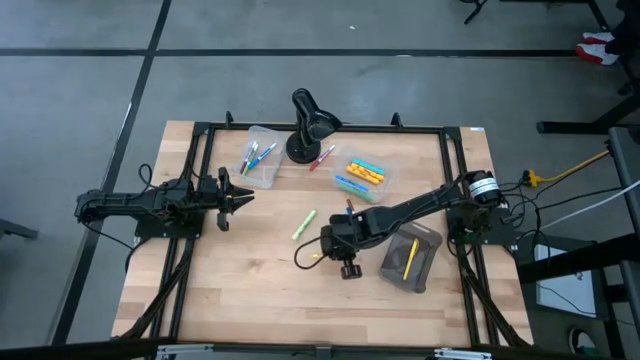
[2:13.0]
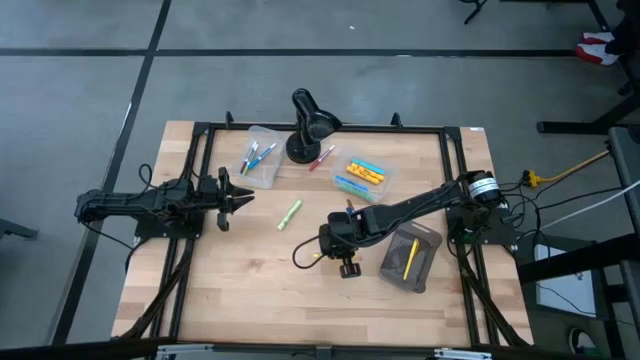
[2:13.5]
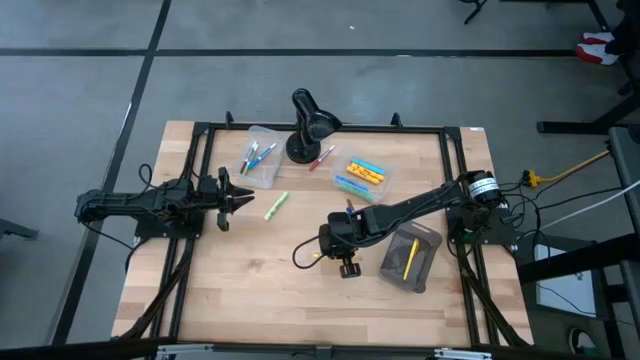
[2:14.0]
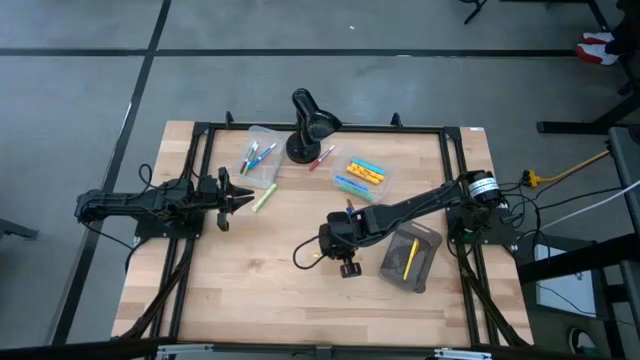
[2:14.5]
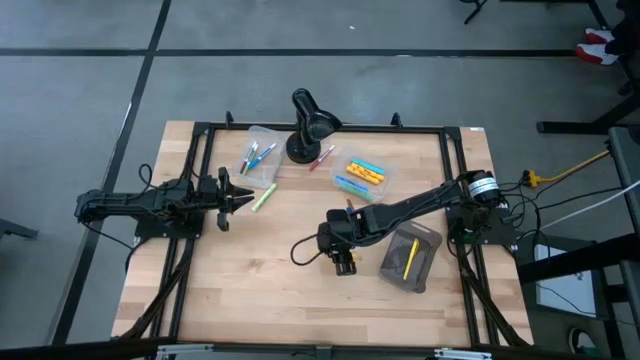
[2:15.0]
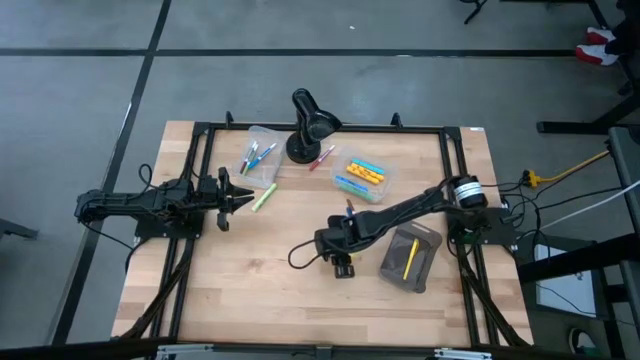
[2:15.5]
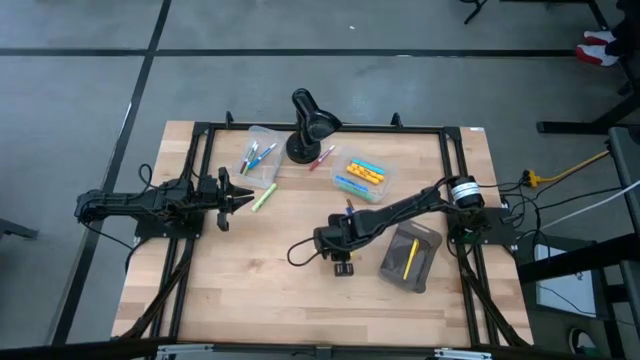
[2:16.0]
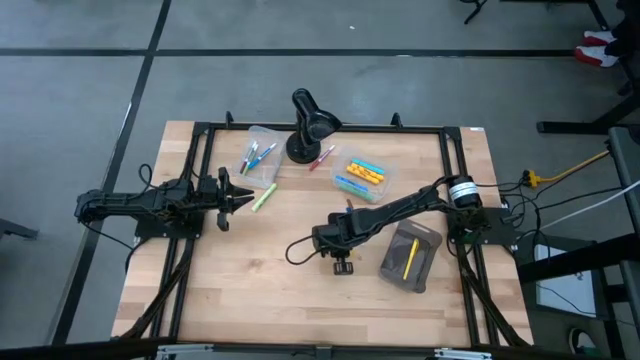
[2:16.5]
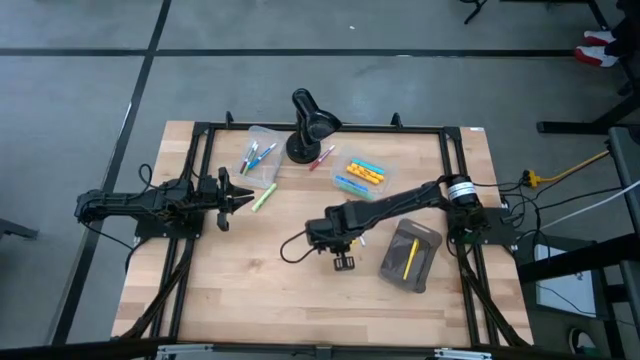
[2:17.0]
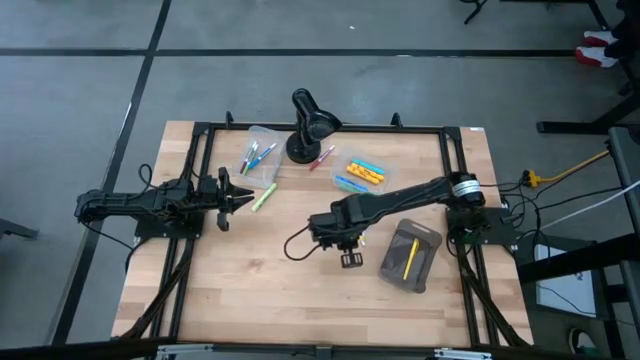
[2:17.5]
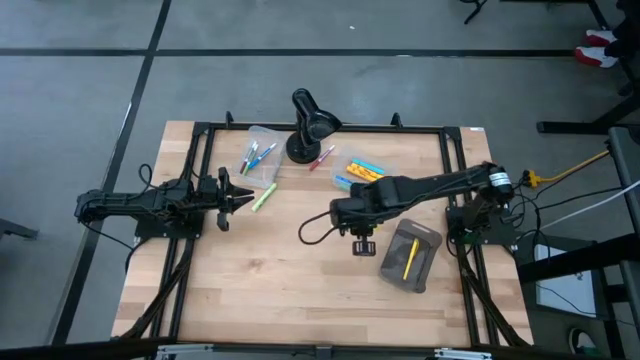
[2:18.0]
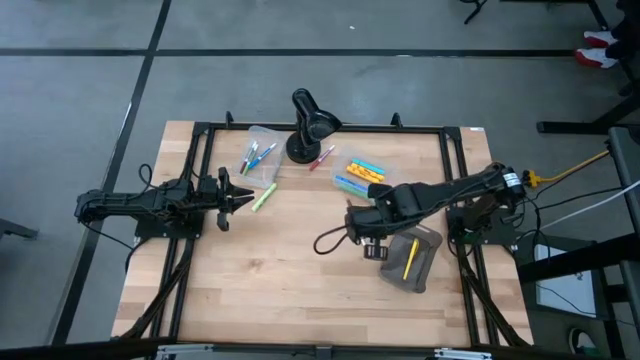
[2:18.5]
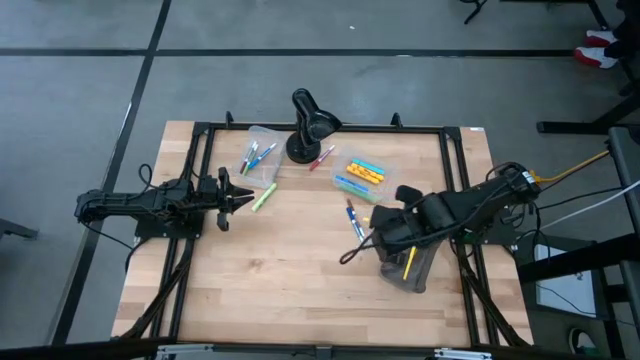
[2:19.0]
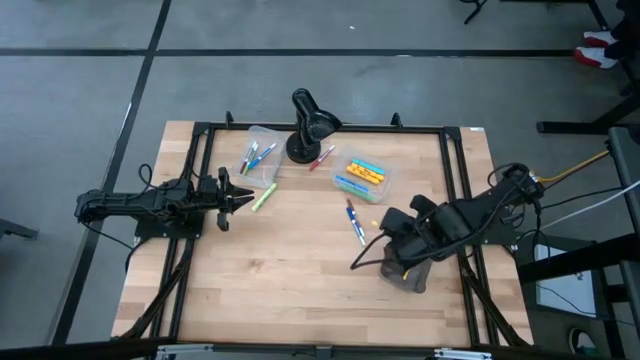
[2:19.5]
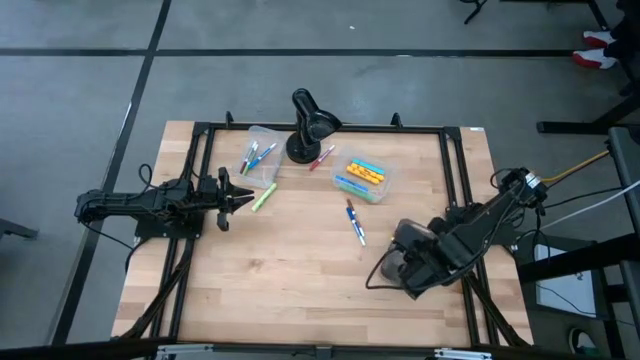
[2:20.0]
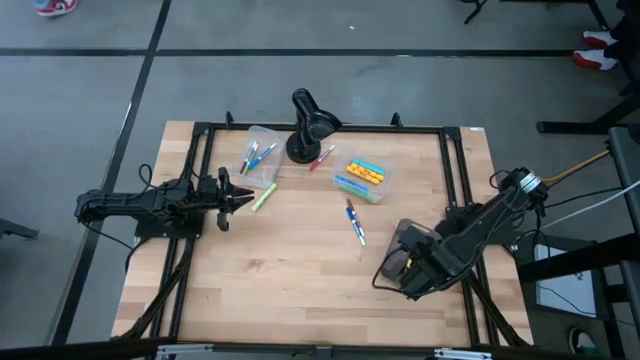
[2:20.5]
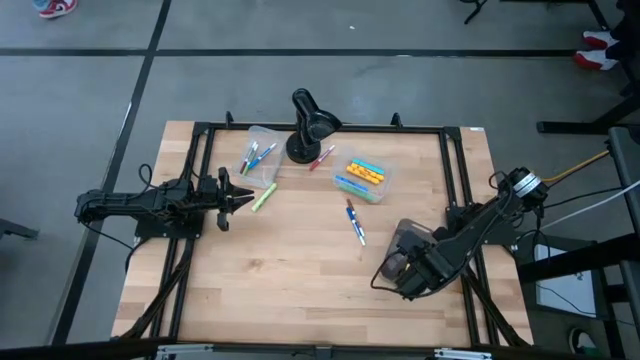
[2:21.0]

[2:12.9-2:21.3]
Task: Pick & Place Markers
Put the yellow pen into the black bin

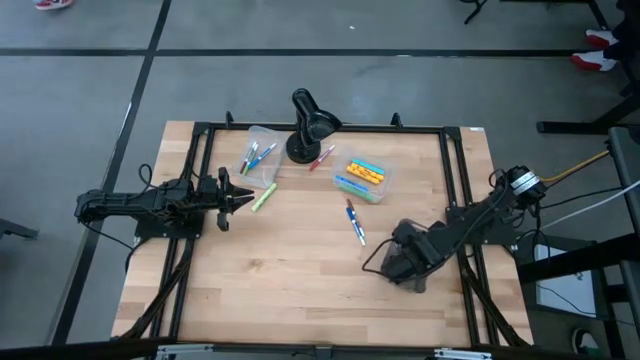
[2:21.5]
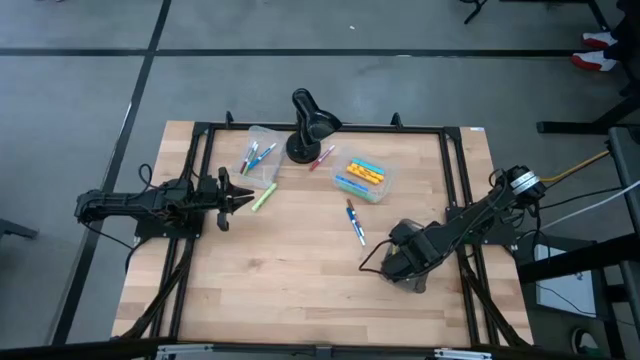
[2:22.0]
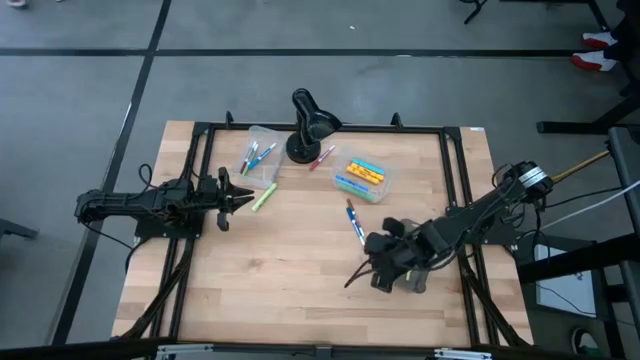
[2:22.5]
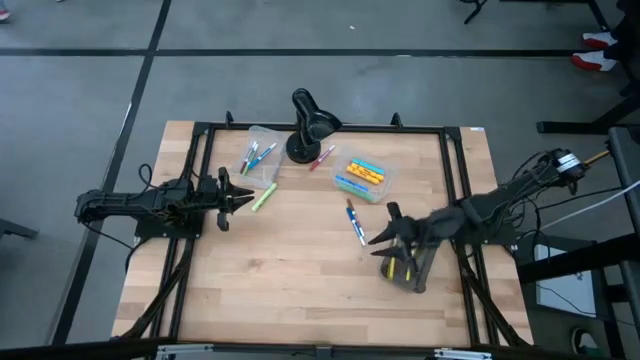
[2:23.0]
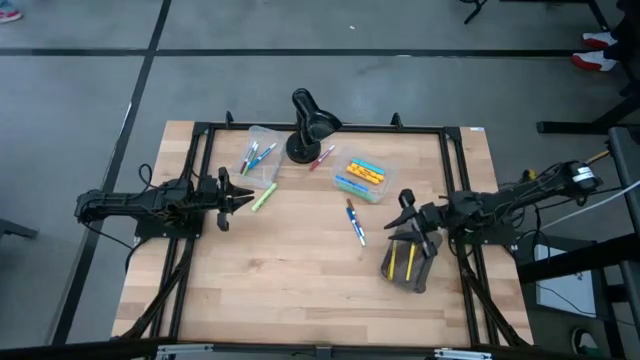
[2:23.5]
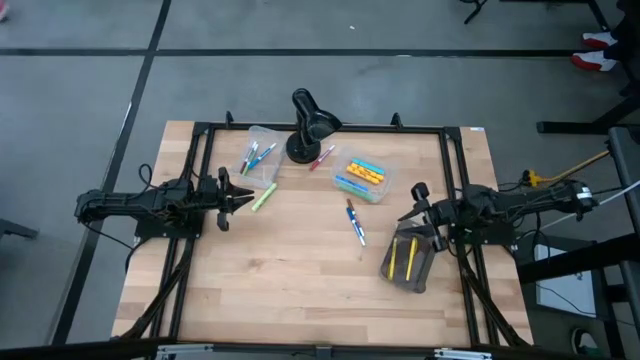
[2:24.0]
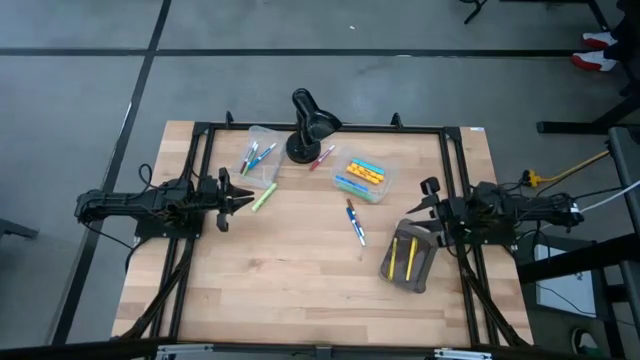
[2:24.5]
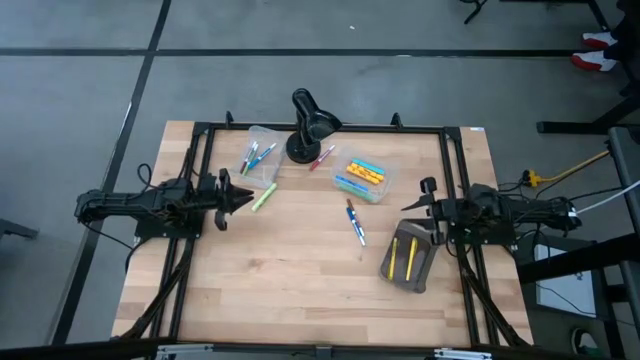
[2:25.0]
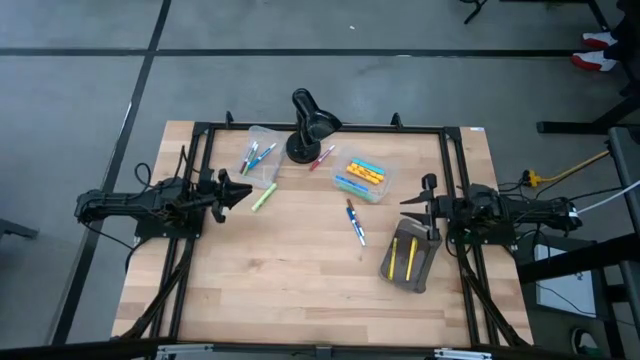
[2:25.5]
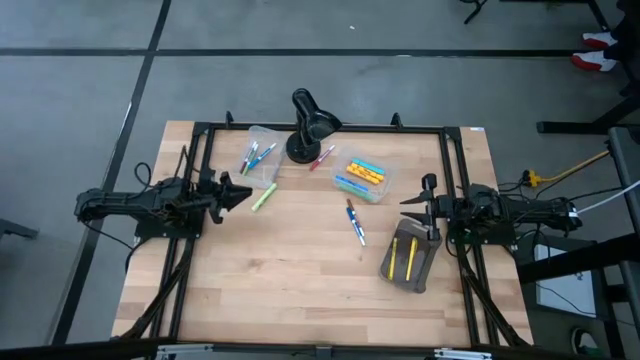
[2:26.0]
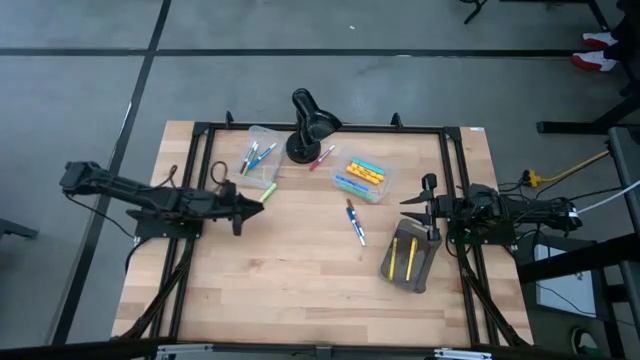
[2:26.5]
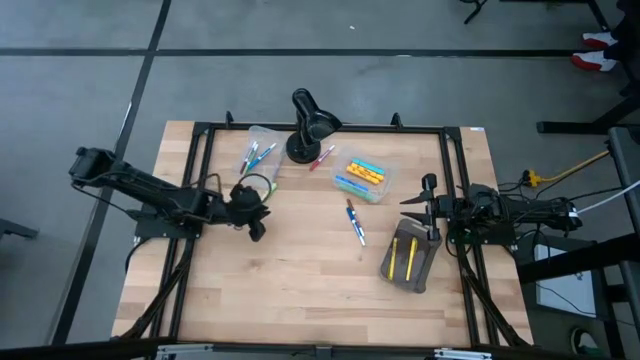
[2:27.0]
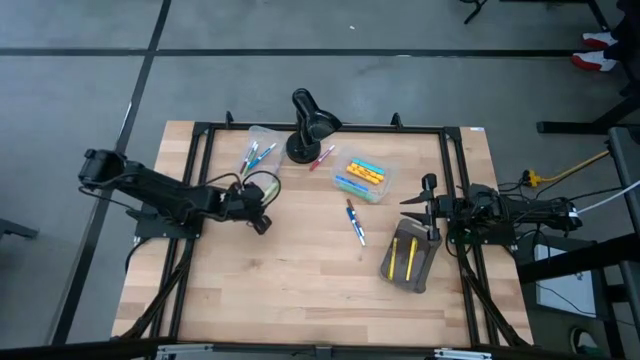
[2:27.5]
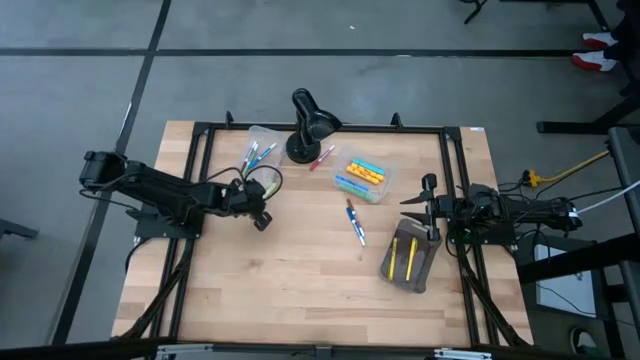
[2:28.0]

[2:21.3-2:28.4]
Put the light green highlighter pen into the right transparent bin

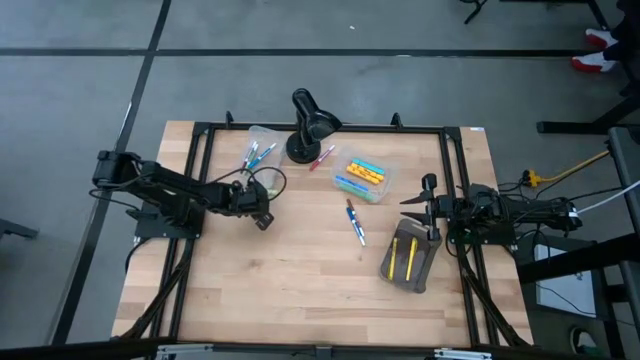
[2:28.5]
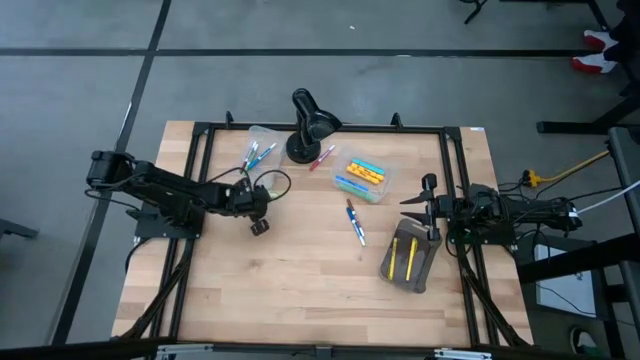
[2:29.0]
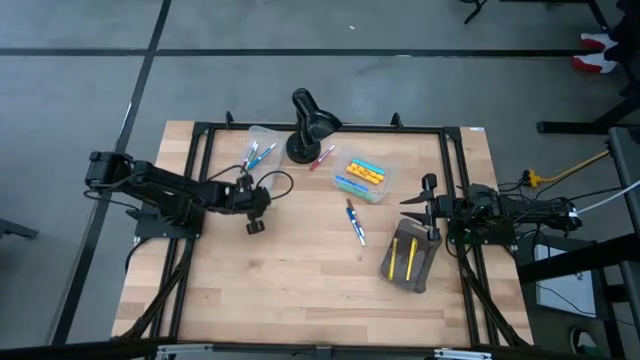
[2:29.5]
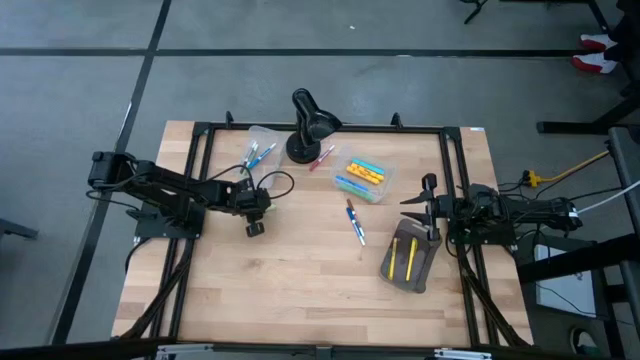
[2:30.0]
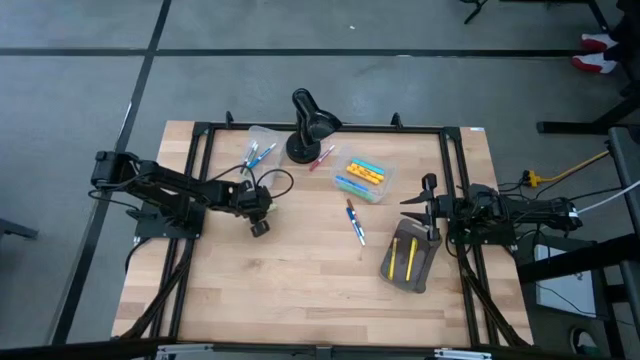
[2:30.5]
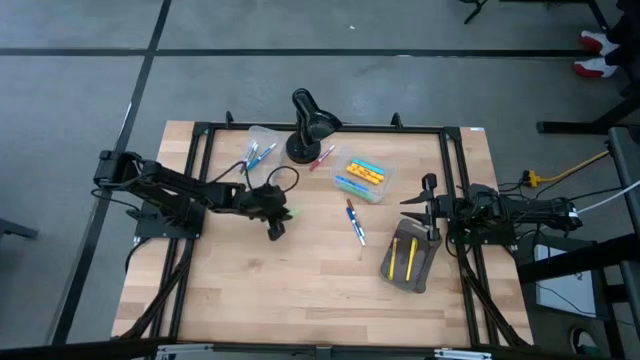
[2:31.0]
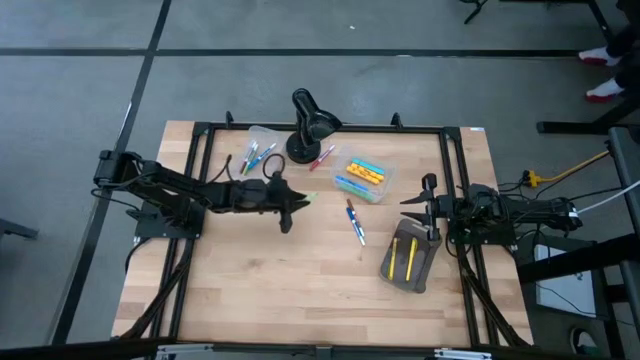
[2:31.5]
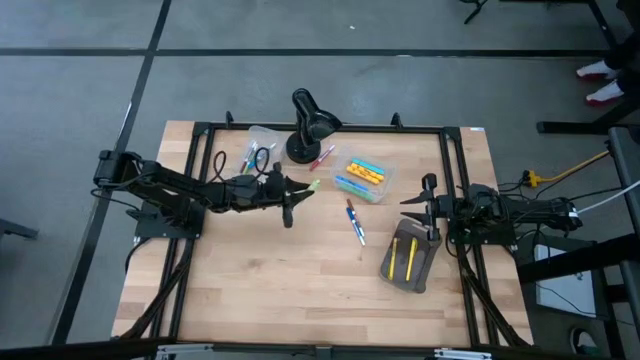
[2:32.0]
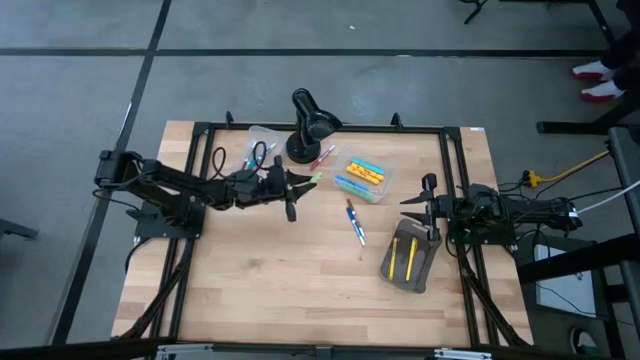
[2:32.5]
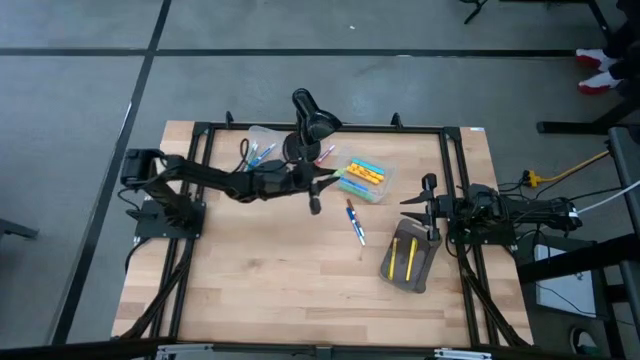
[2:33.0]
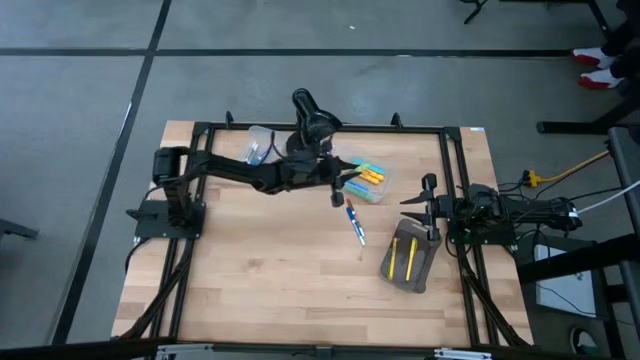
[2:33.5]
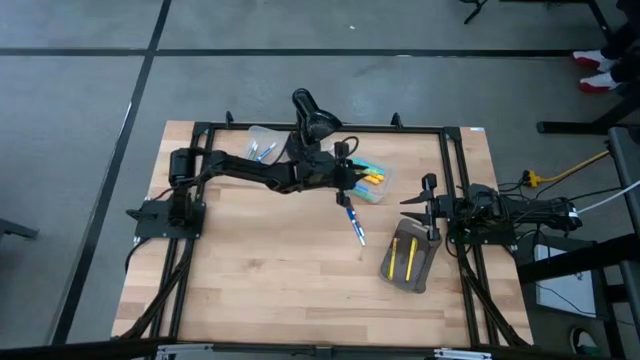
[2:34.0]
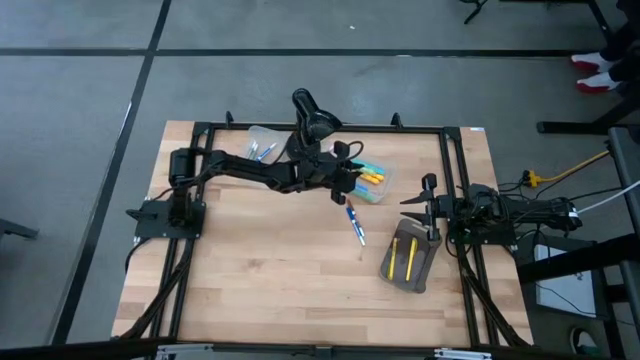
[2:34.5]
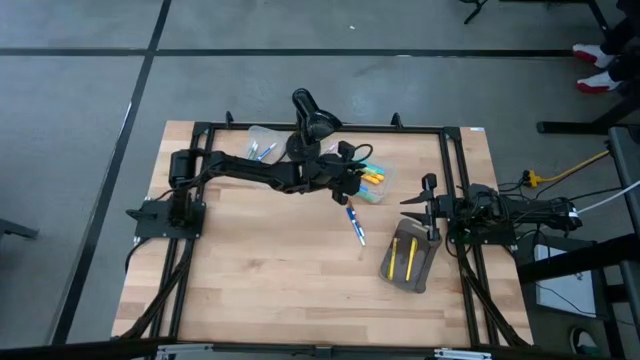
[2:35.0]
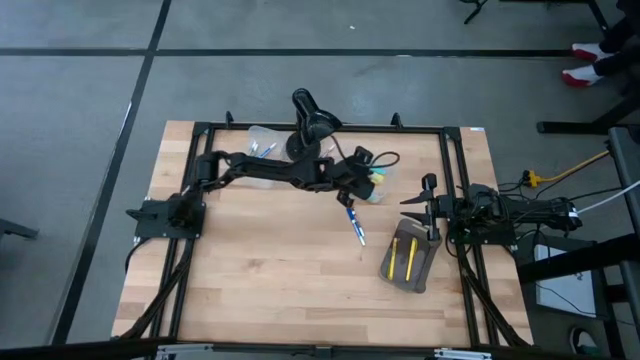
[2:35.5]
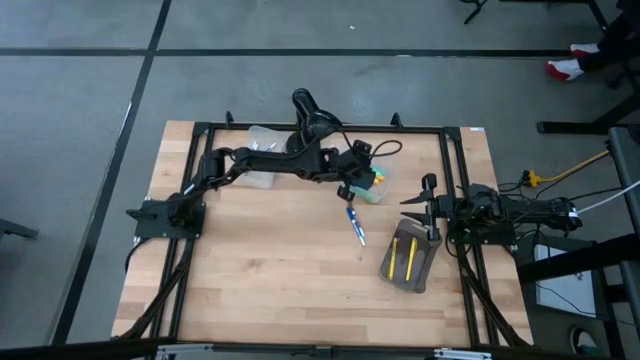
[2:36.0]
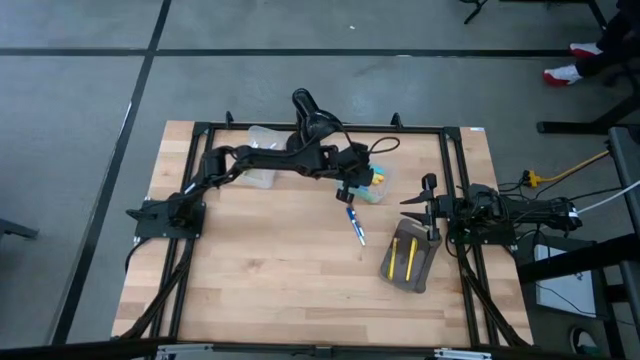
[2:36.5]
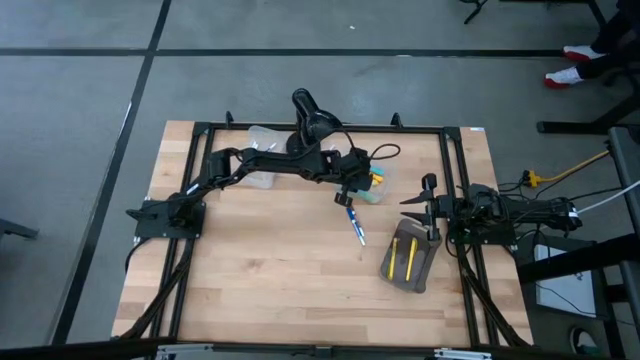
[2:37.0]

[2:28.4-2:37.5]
Put the light green highlighter pen into the right transparent bin
